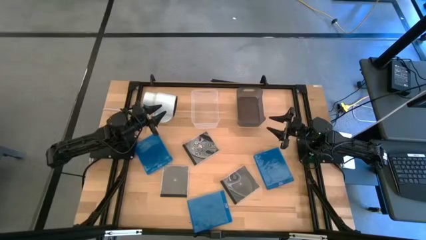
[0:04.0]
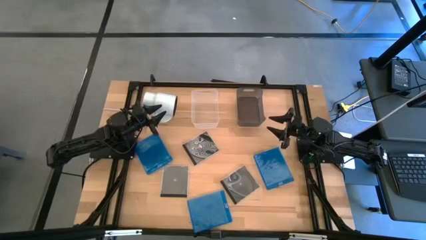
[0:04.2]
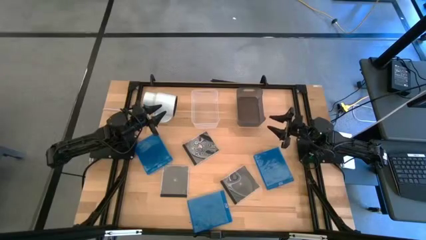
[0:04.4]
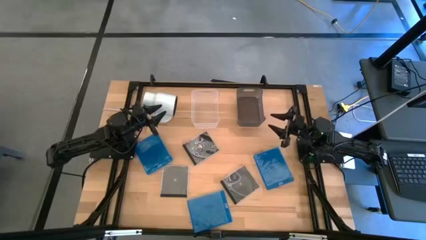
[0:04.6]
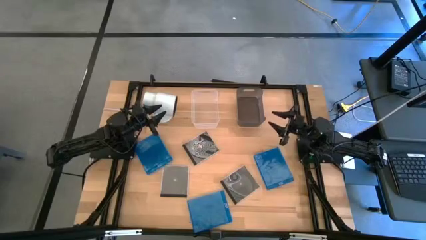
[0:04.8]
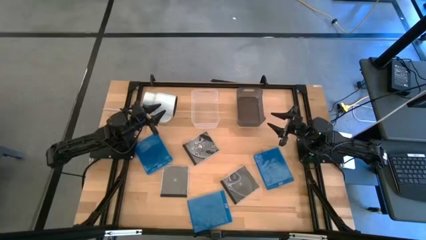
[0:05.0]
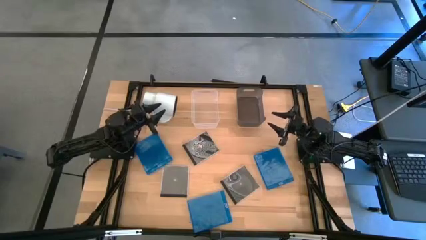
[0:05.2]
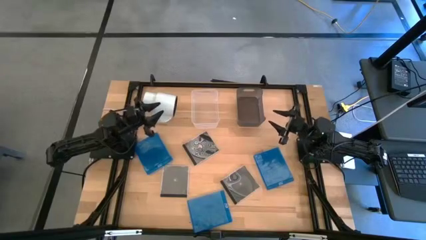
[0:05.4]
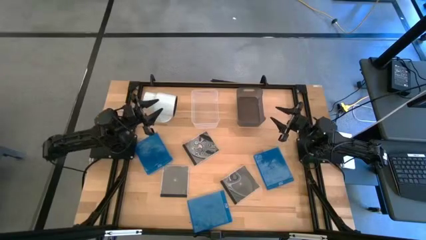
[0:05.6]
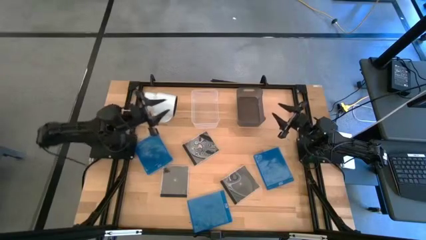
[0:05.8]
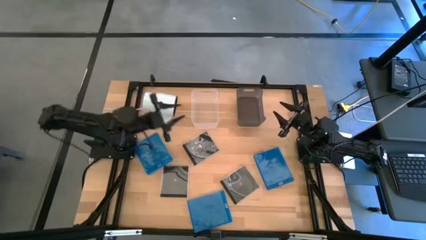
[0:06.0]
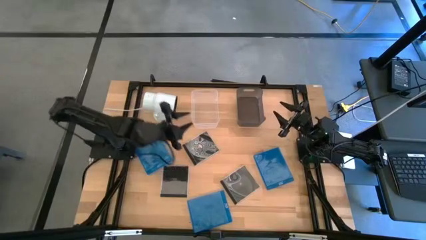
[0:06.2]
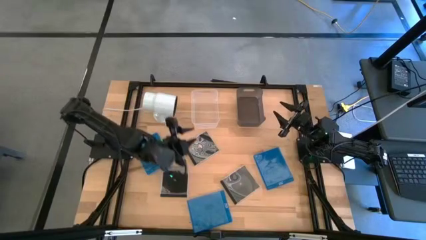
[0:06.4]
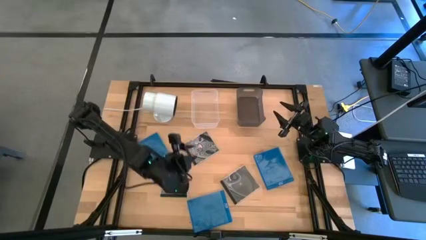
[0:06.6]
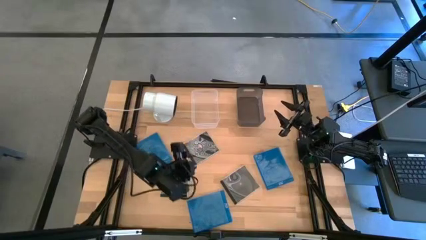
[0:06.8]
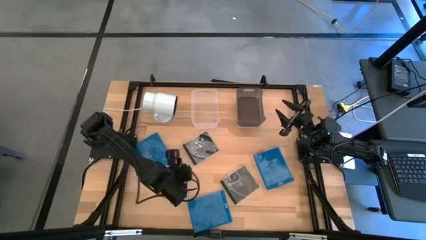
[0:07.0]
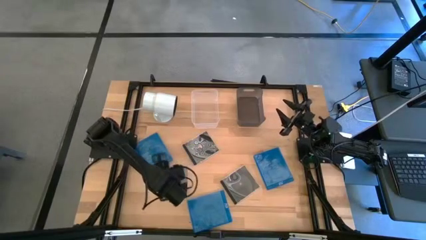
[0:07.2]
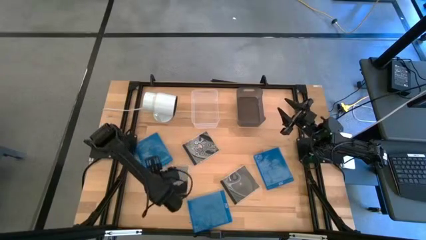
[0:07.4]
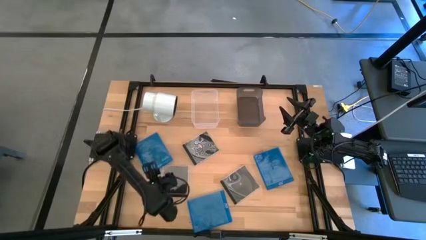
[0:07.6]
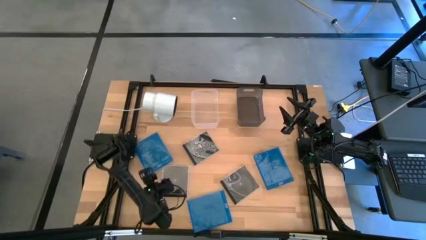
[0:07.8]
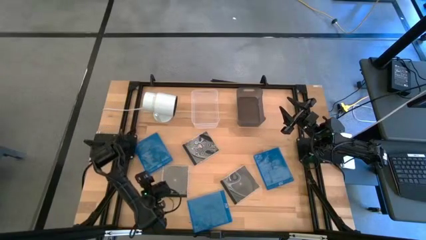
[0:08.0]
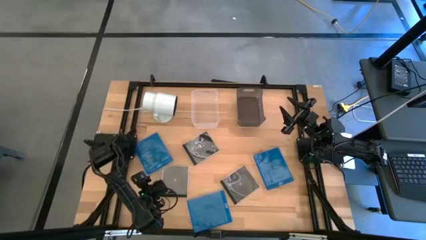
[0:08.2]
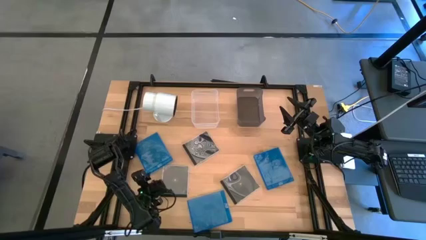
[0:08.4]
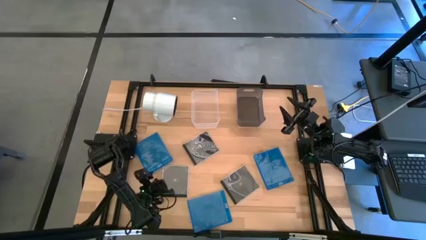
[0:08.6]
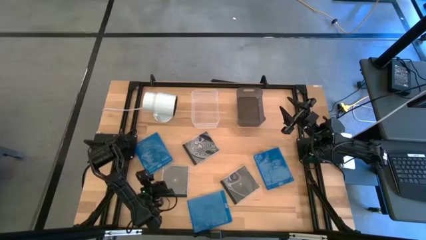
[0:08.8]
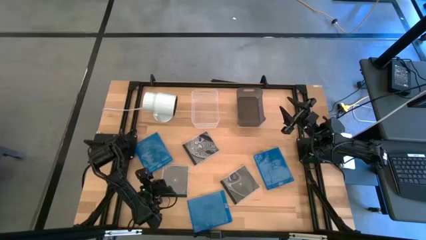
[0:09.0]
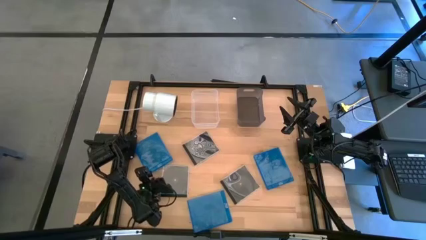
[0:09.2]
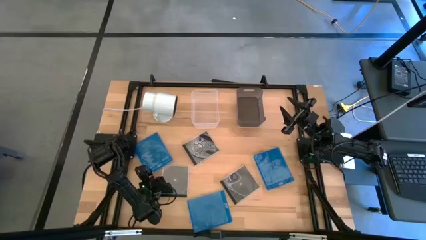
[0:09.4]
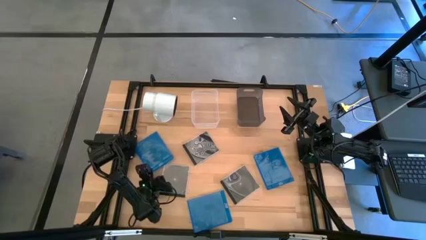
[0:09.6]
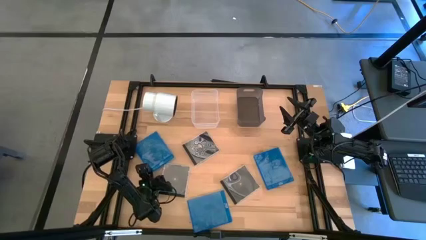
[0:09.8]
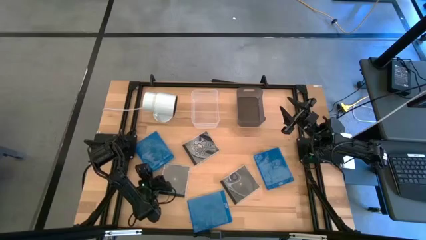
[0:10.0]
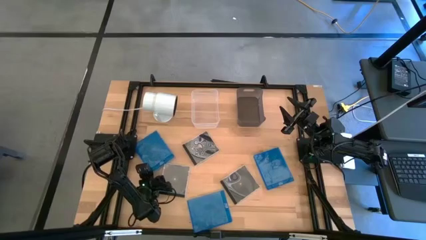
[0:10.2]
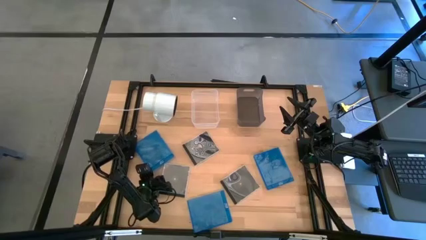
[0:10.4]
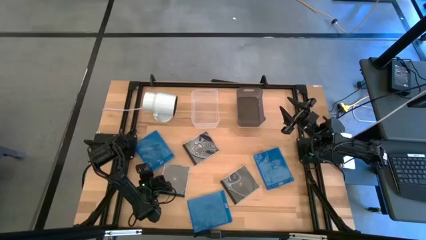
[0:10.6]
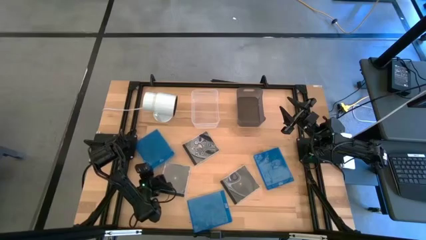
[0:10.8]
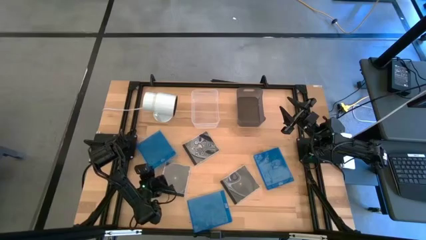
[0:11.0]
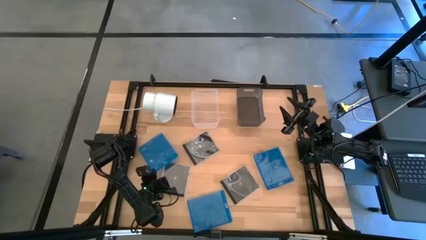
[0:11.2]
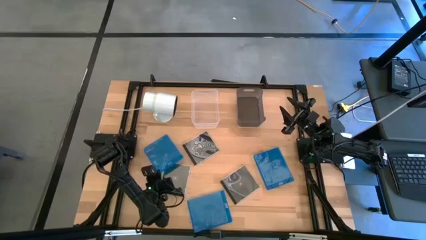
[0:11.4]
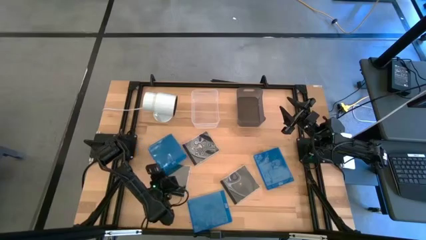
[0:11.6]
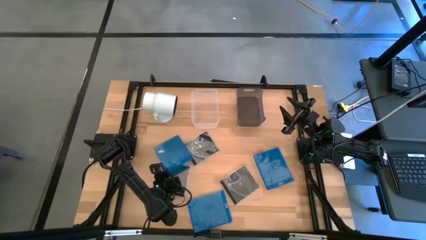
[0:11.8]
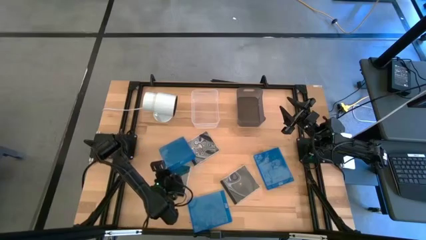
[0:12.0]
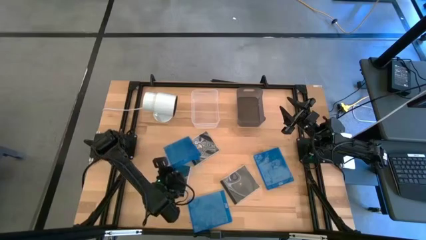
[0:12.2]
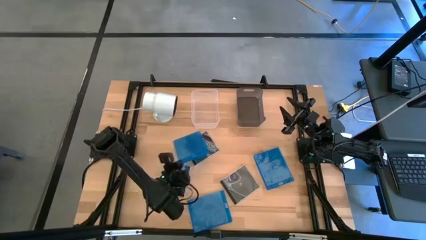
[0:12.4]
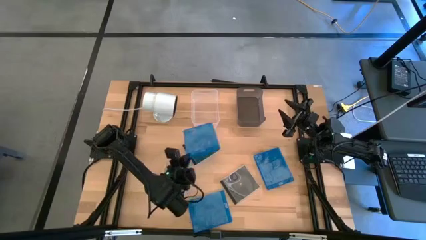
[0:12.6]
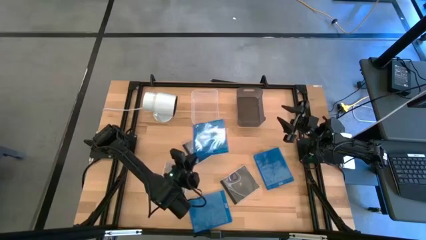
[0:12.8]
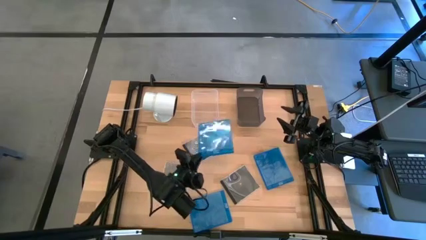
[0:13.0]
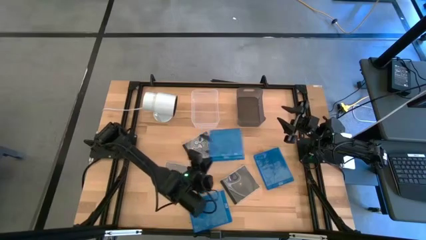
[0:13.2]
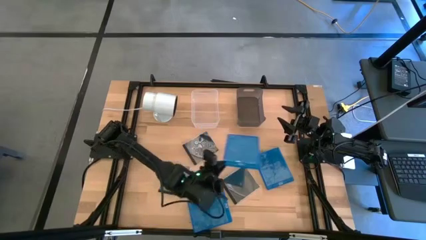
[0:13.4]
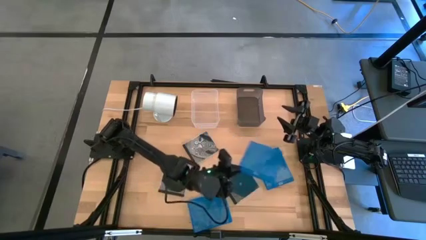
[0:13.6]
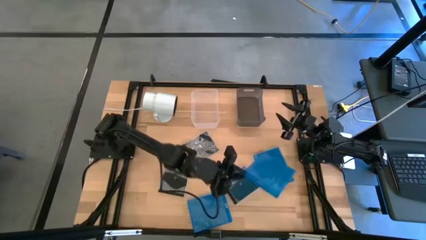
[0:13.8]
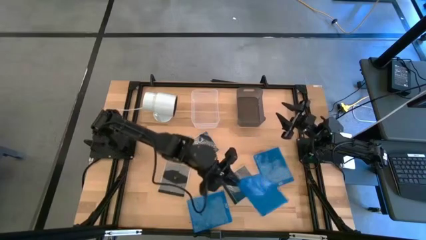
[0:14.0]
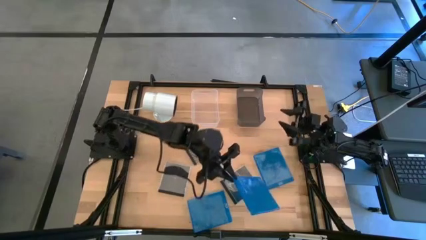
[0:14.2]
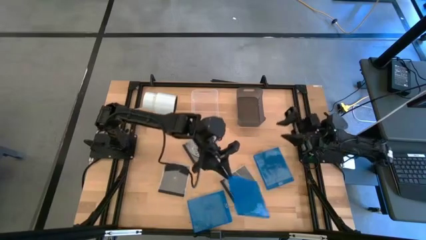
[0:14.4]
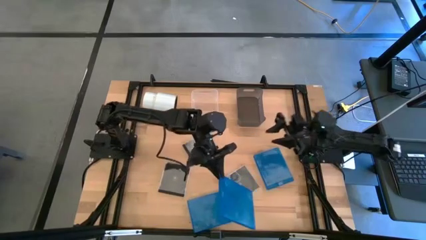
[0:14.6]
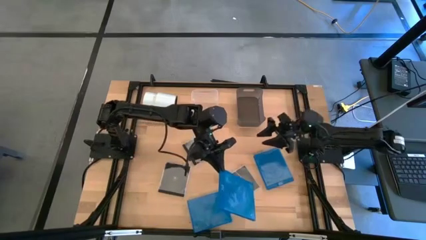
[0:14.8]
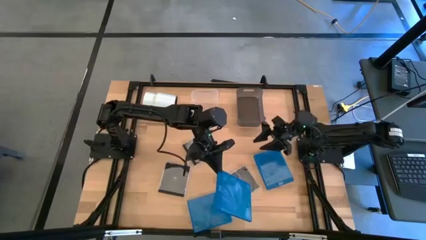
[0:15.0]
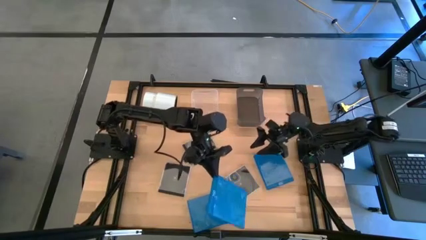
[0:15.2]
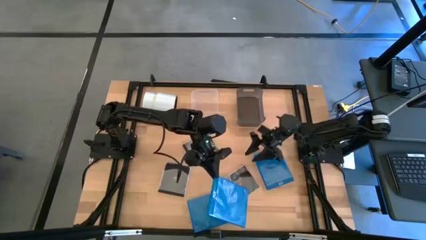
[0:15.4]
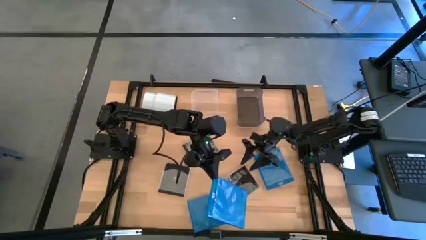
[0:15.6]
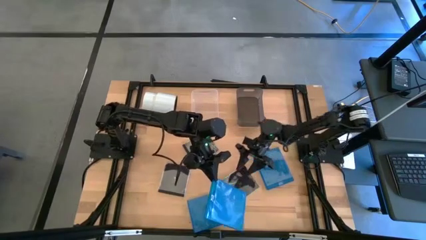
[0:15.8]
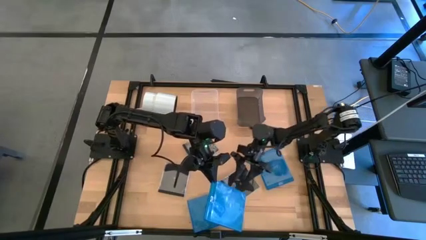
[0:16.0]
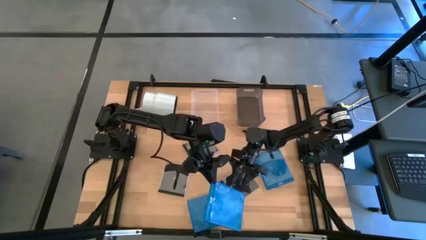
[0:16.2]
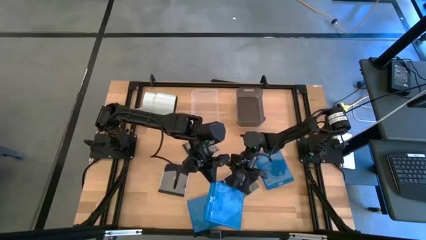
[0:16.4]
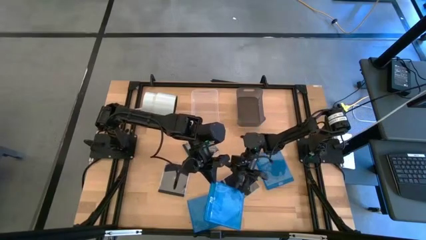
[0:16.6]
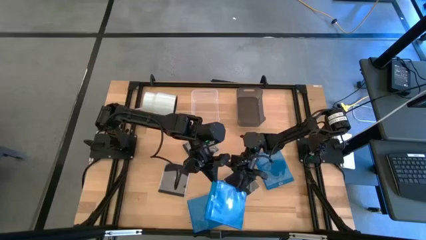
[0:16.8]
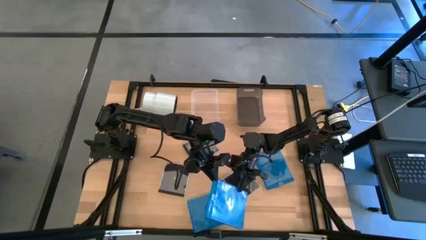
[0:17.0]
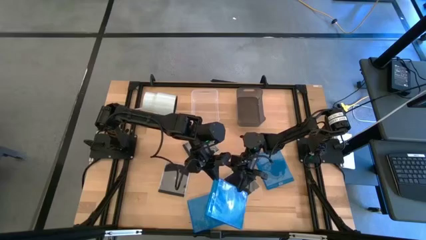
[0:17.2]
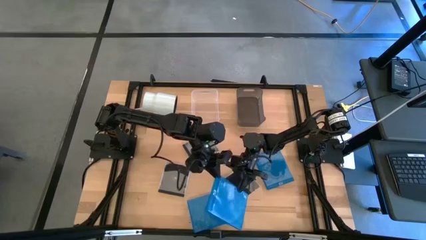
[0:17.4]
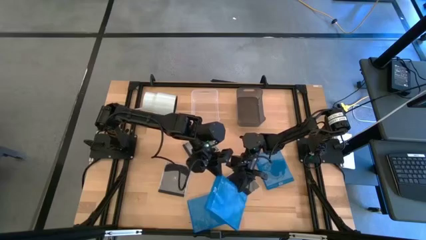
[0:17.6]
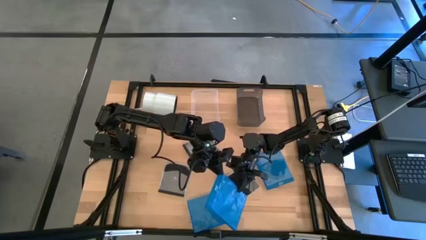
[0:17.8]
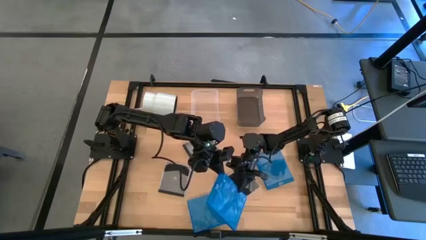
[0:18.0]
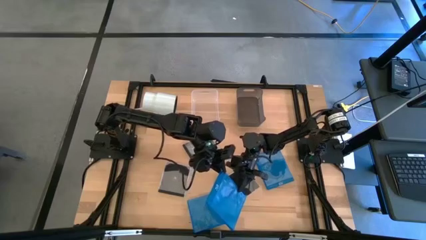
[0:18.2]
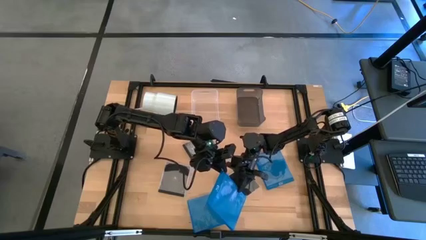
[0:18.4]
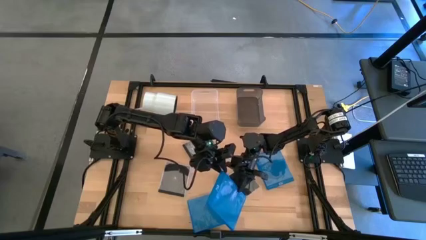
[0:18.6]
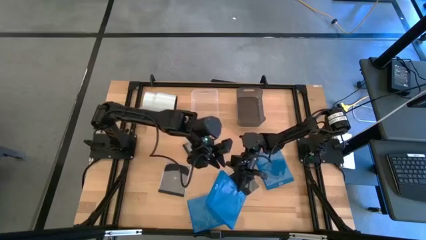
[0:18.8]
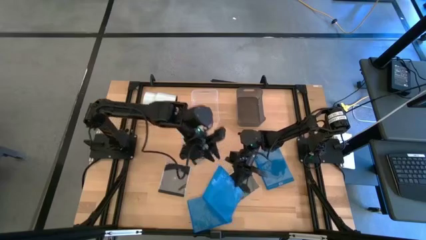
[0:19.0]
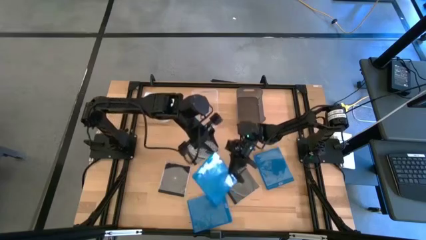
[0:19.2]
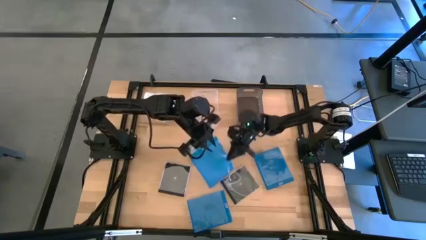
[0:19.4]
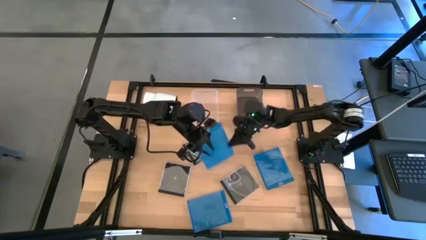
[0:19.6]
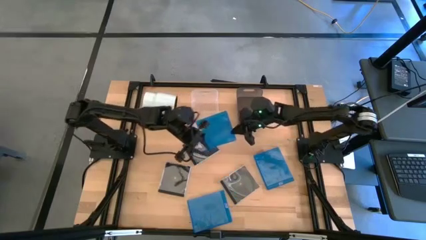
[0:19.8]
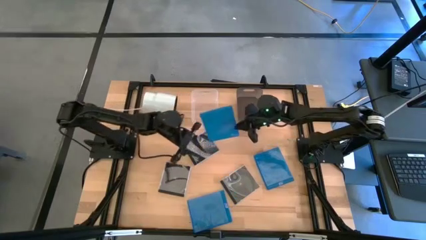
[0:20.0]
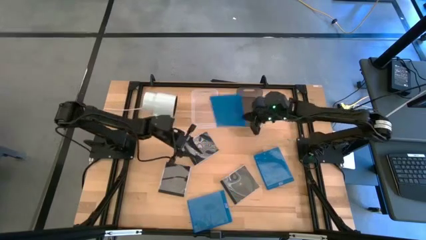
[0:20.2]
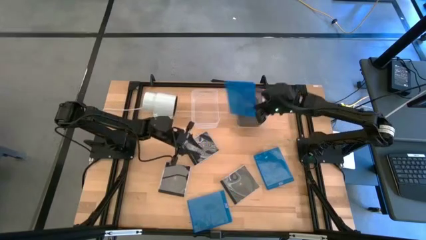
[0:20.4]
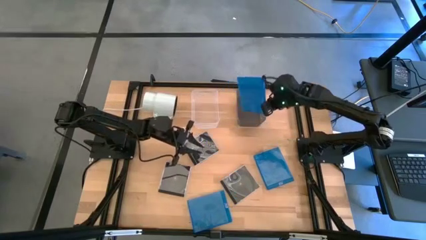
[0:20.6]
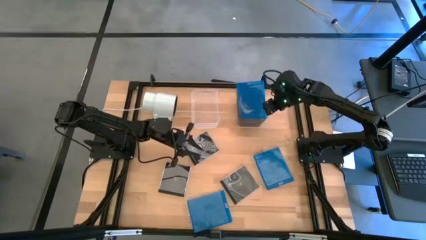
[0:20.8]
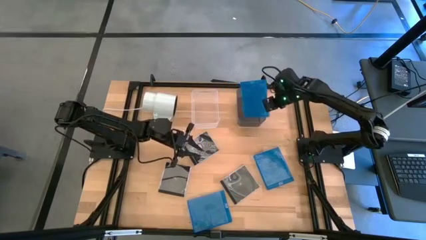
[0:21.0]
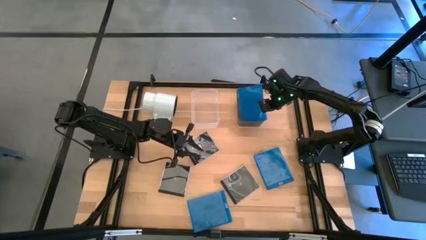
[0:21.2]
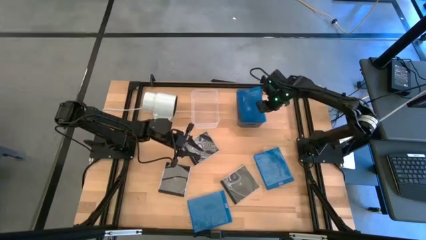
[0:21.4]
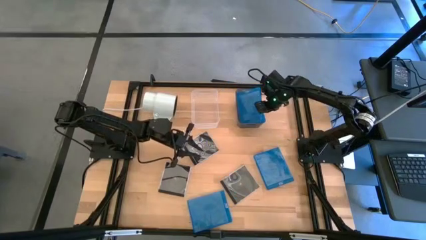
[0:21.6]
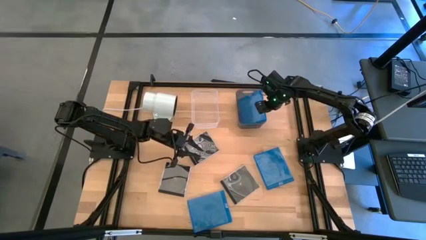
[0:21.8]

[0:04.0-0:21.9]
Task: Pick & place jewel cases by type
Put the top left blue cd case into the gray bin
